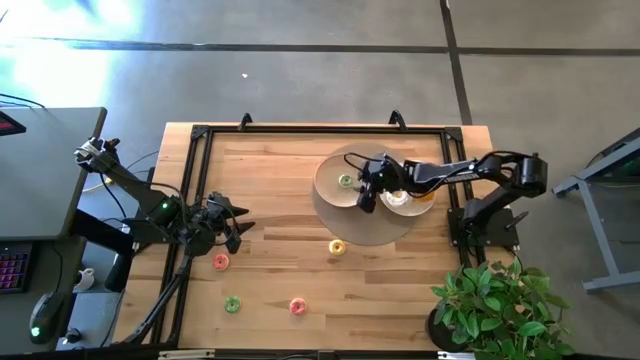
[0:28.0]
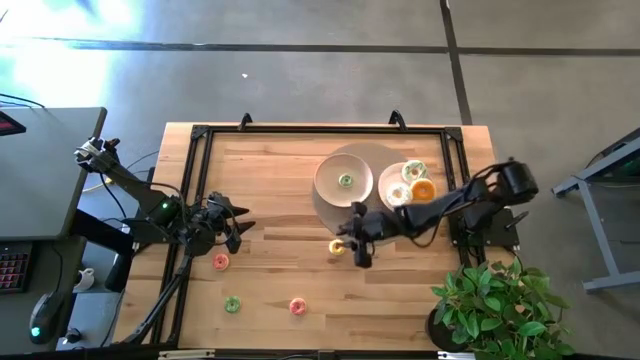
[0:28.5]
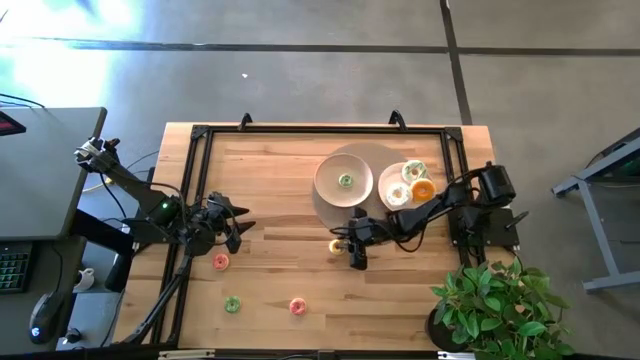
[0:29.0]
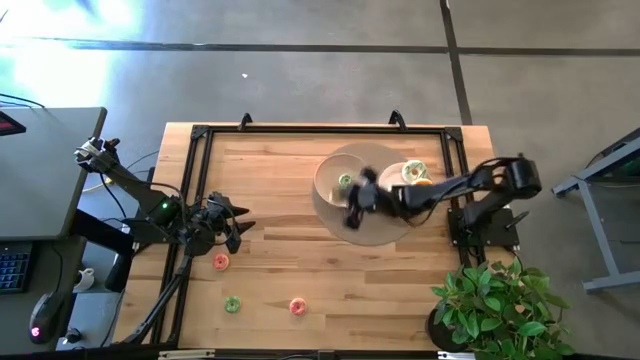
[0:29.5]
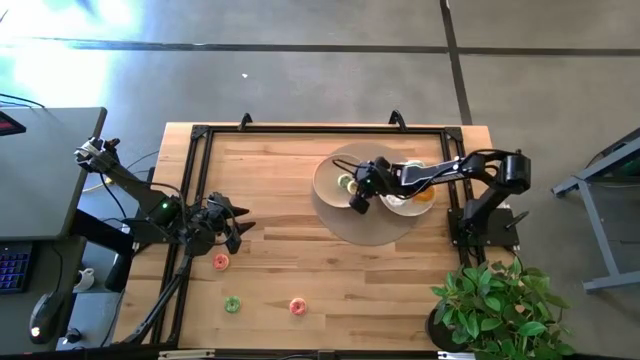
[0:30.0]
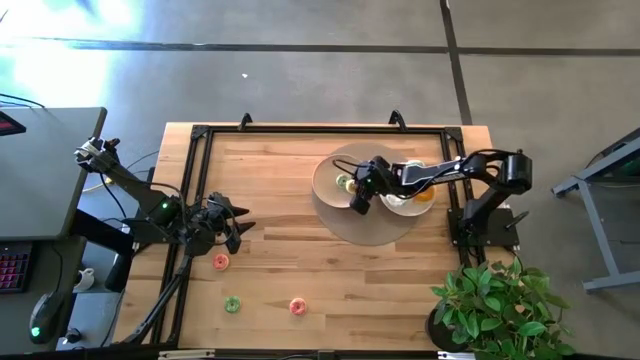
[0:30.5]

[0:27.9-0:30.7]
Task: Pick & Place donuts
Put the small yellow doughnut on the left white plate

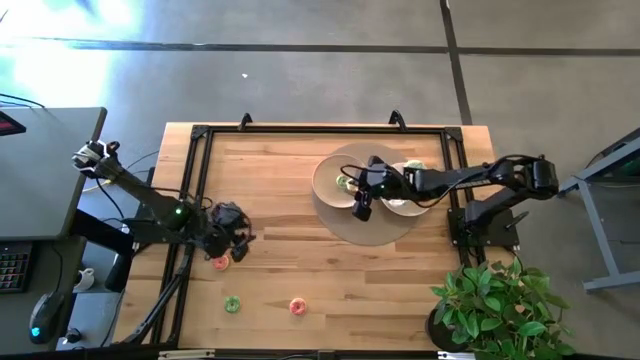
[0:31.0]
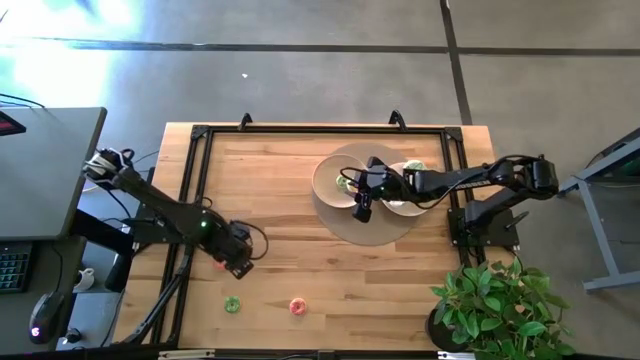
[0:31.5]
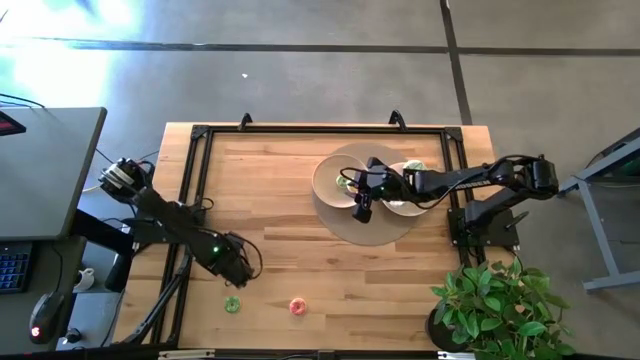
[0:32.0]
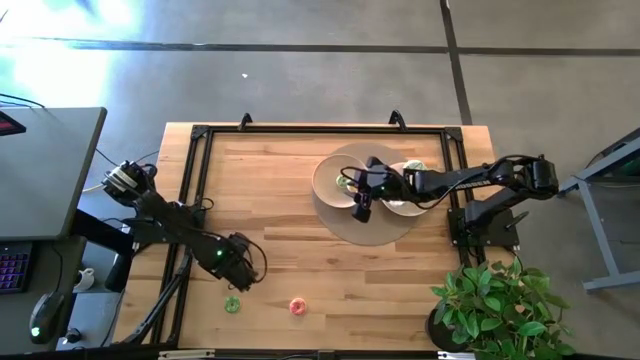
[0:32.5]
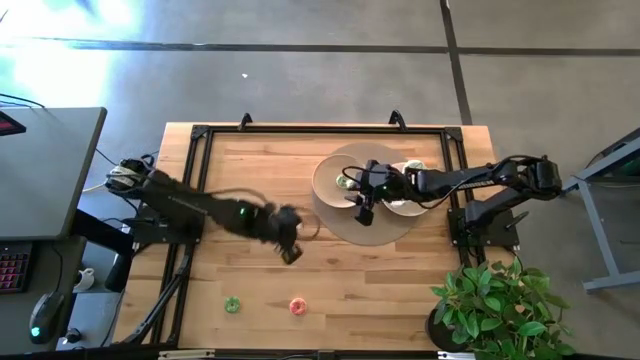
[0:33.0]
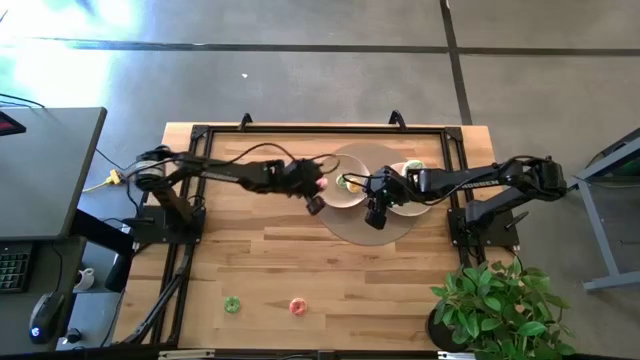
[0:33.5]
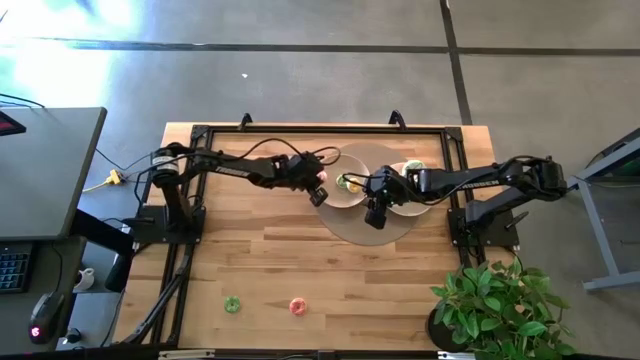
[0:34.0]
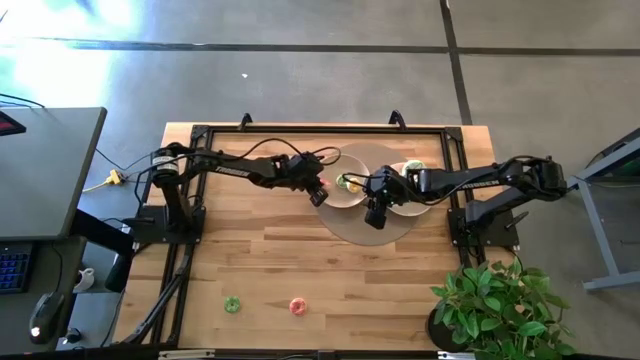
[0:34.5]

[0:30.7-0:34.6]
Put the top pink doughnut on the left white plate

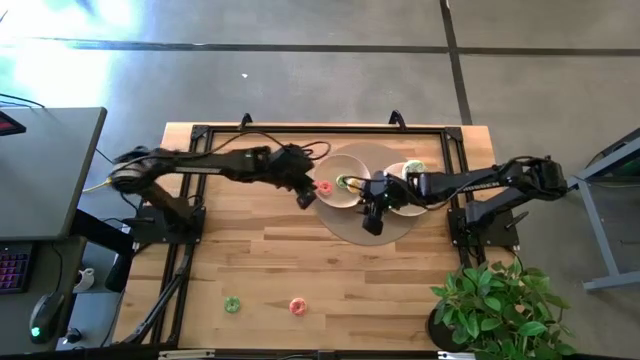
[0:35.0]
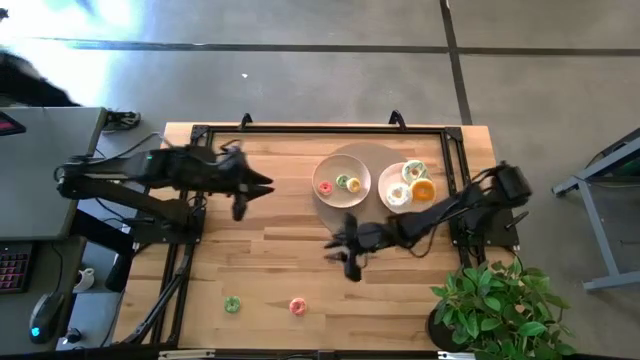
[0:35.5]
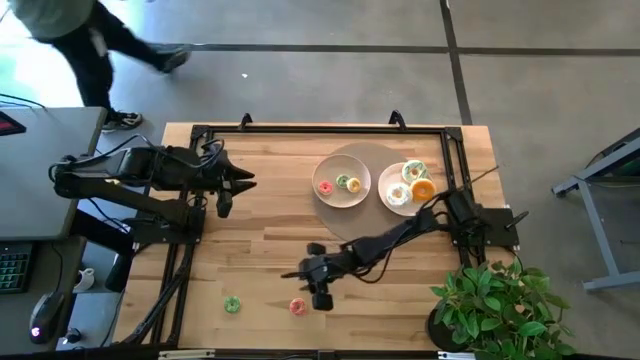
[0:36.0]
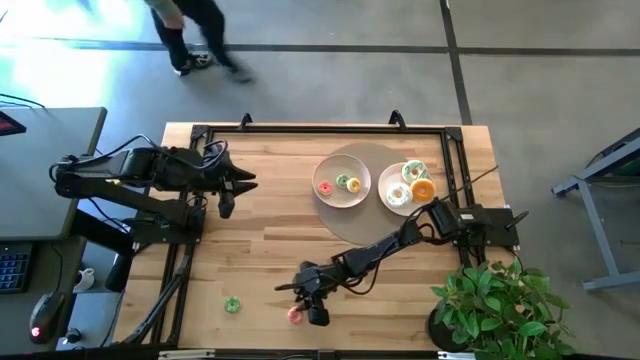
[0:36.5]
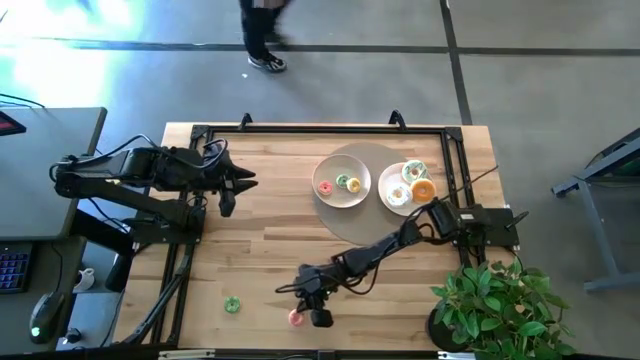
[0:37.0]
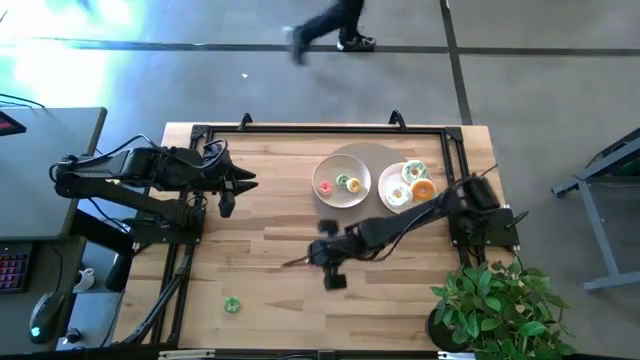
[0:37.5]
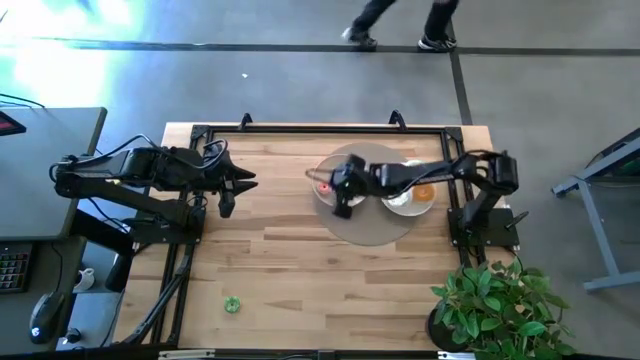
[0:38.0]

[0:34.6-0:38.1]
Put the pink doughnut on the left white plate

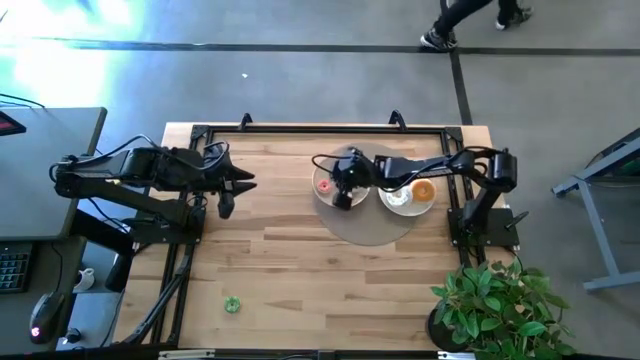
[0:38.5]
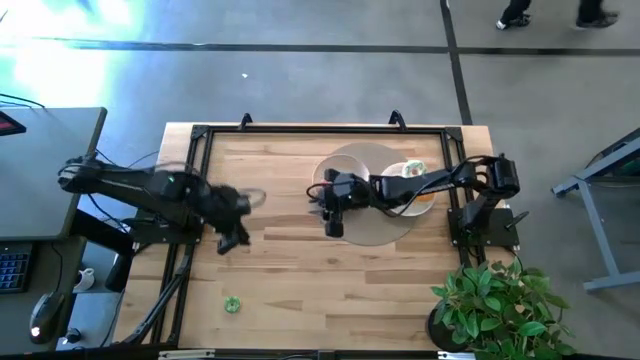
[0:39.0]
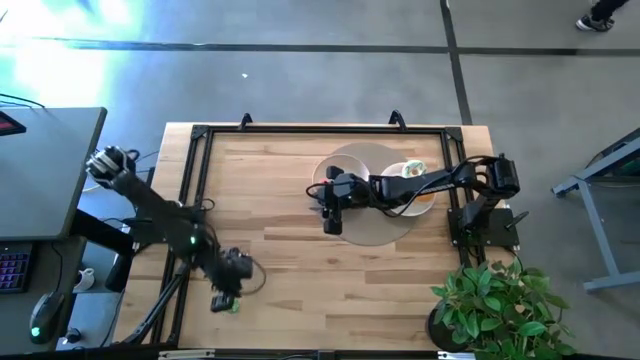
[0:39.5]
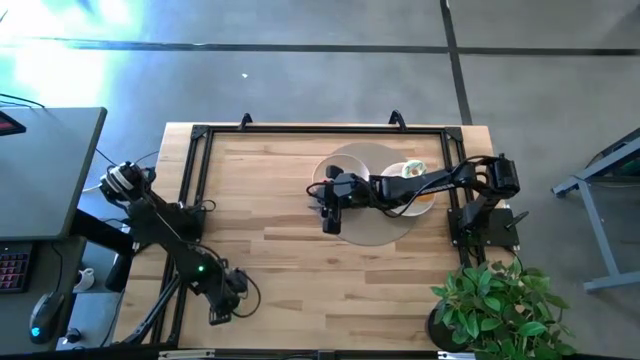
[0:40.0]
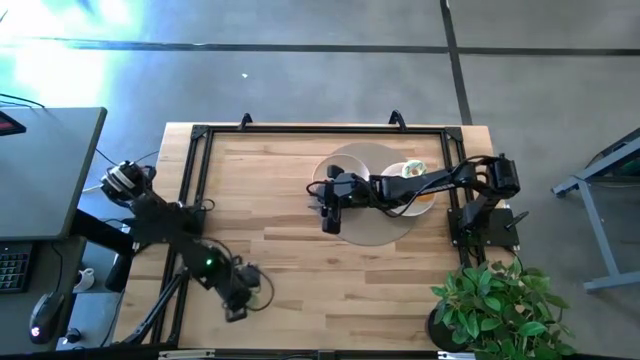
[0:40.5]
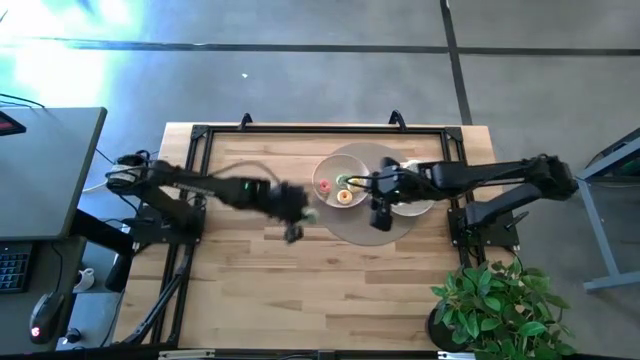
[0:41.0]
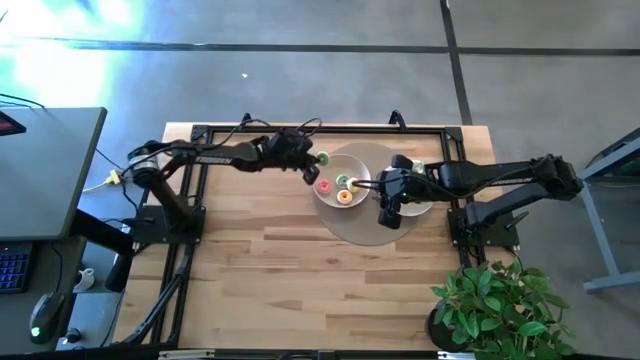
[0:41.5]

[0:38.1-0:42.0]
Put the small green doughnut on the left white plate

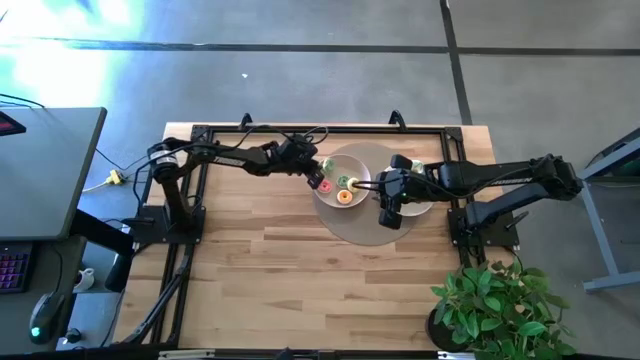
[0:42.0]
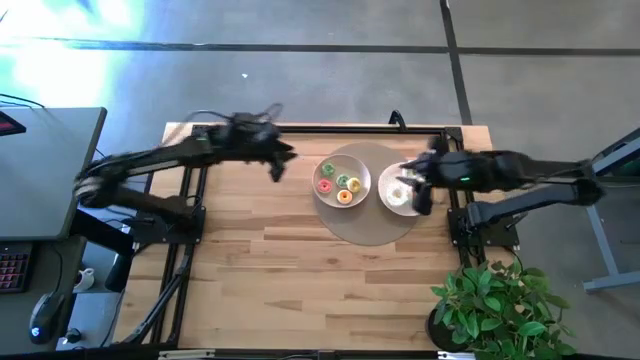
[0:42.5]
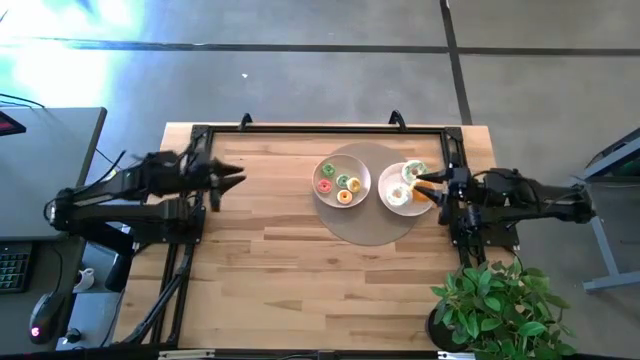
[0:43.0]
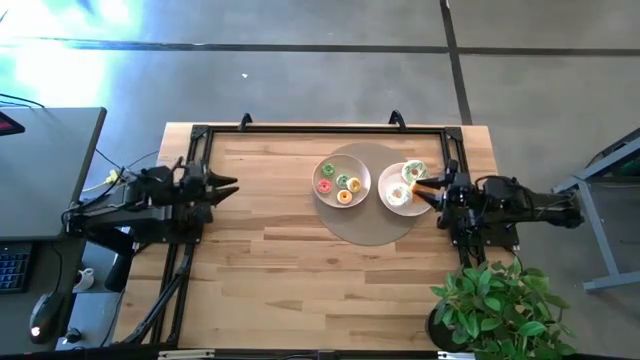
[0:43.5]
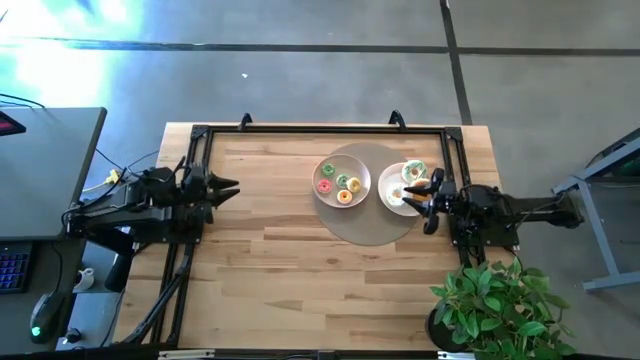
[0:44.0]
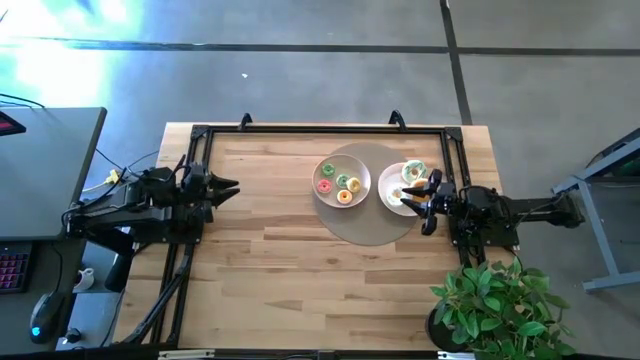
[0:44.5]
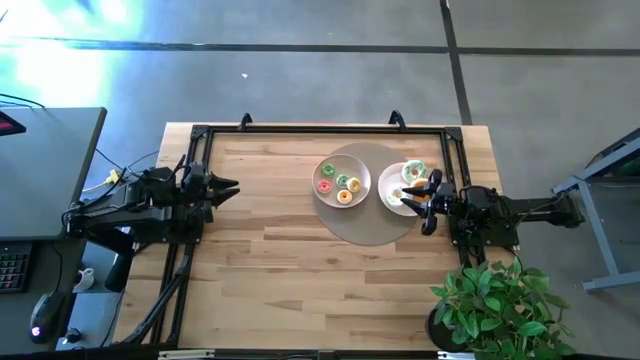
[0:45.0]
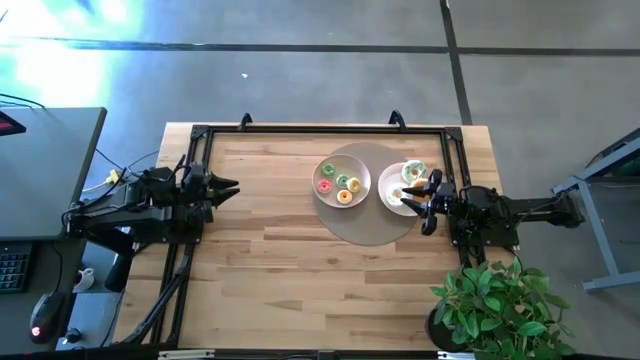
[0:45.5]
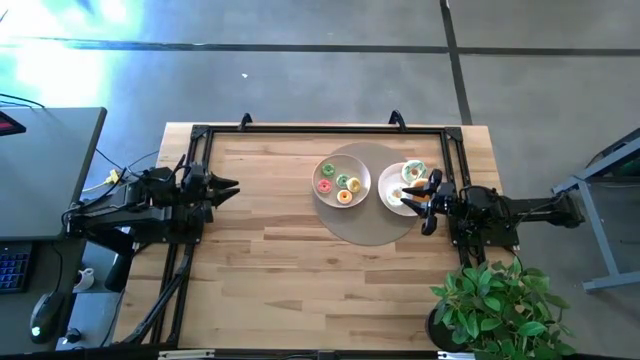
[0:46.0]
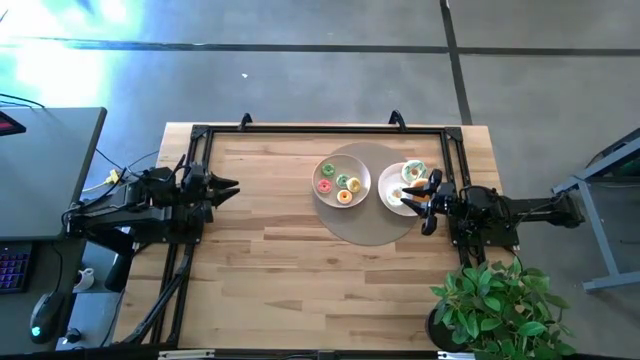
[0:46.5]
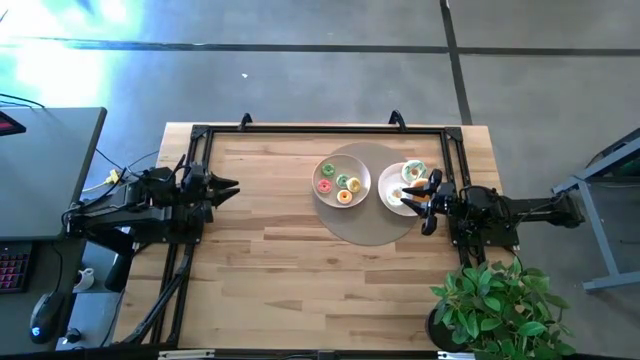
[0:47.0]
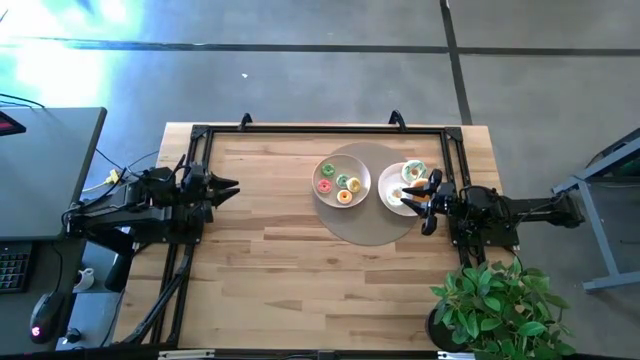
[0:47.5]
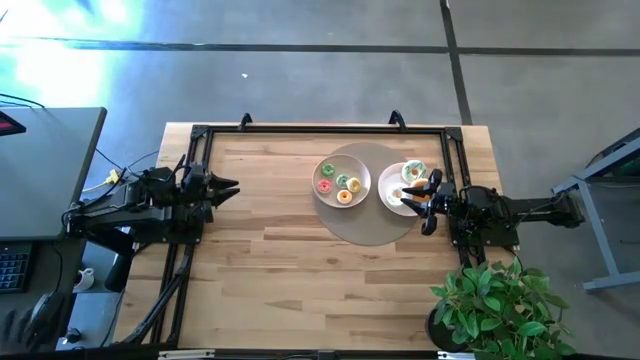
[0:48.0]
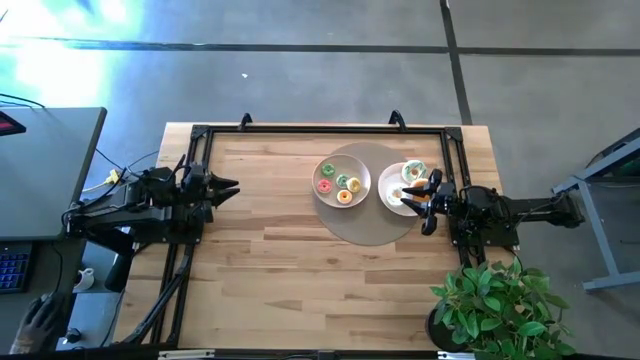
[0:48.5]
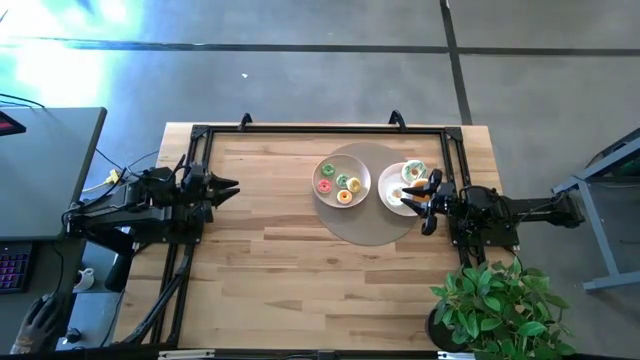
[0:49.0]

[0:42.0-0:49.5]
Return to Home Position
